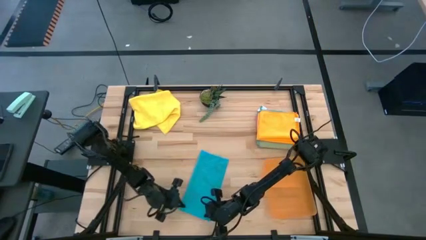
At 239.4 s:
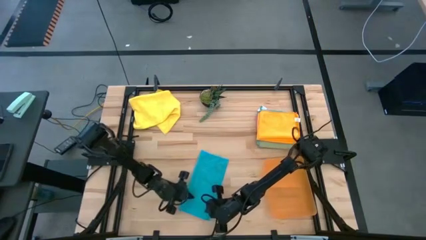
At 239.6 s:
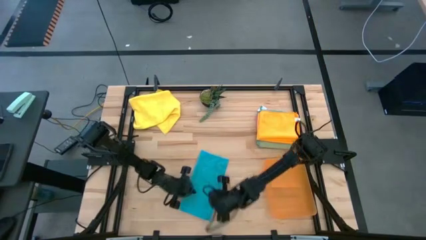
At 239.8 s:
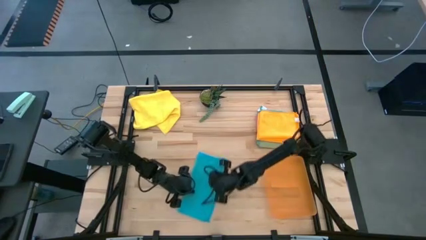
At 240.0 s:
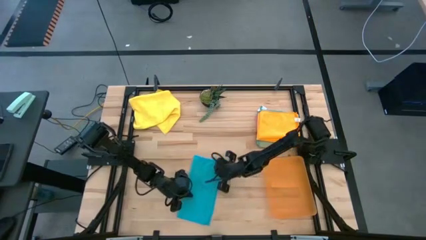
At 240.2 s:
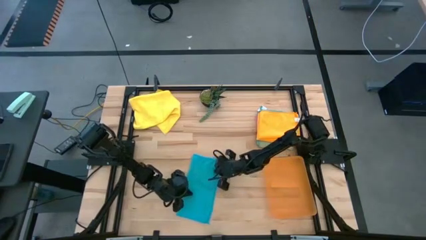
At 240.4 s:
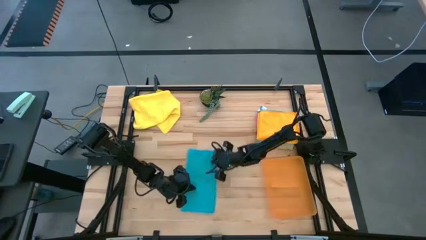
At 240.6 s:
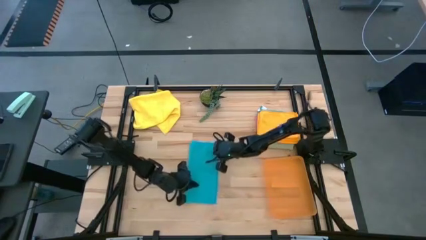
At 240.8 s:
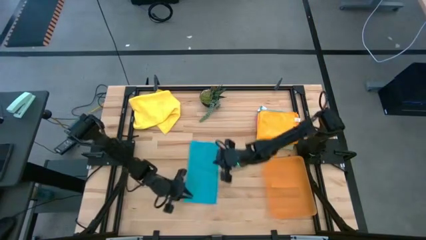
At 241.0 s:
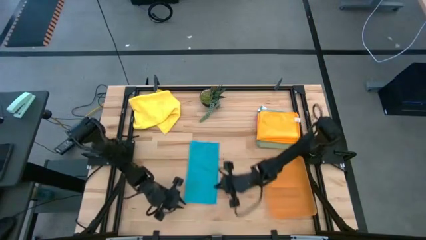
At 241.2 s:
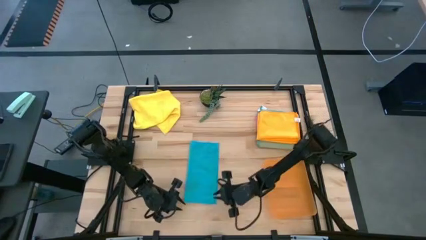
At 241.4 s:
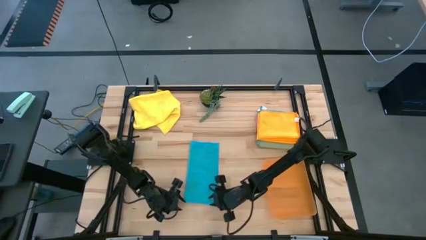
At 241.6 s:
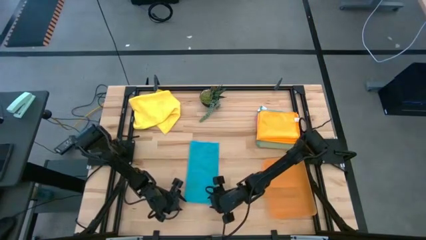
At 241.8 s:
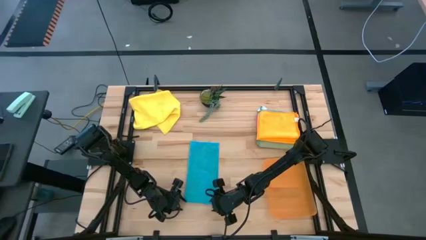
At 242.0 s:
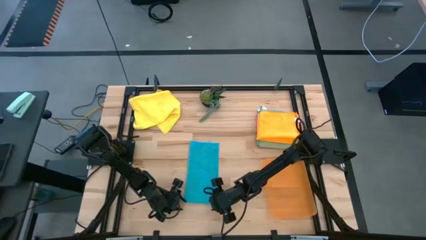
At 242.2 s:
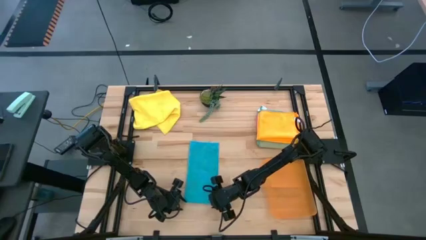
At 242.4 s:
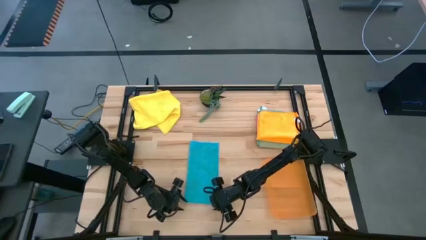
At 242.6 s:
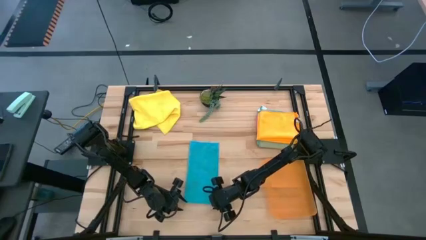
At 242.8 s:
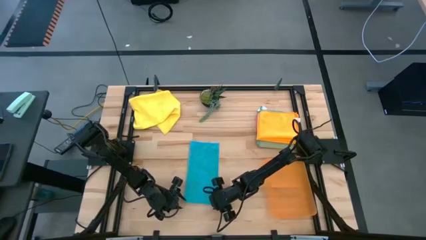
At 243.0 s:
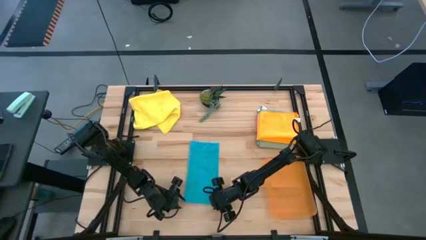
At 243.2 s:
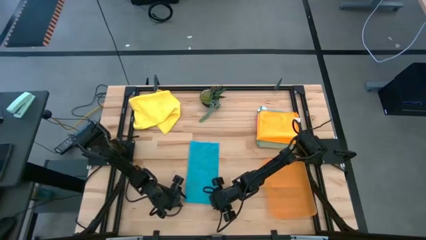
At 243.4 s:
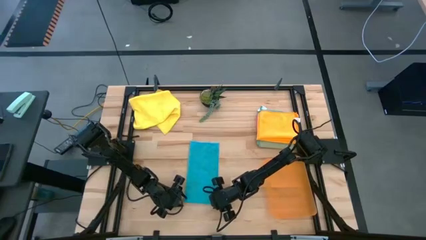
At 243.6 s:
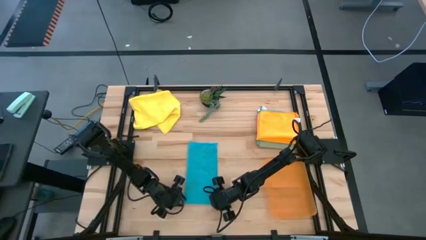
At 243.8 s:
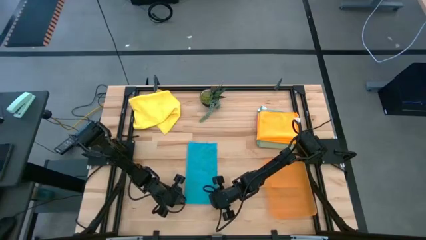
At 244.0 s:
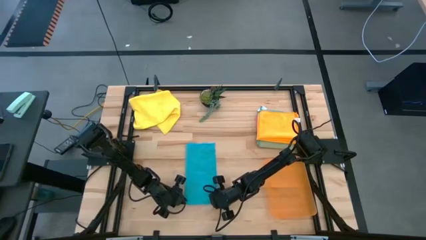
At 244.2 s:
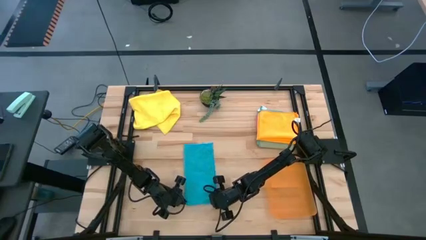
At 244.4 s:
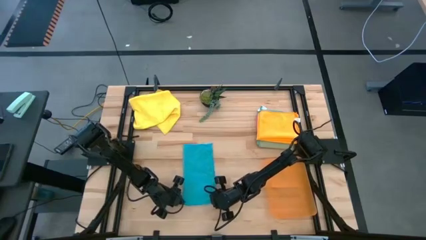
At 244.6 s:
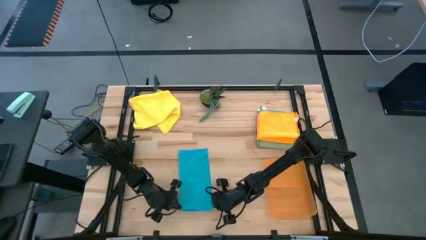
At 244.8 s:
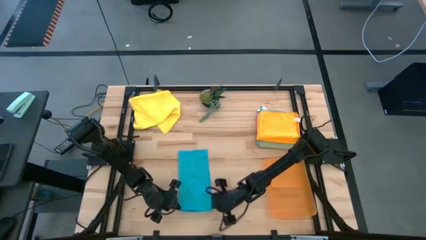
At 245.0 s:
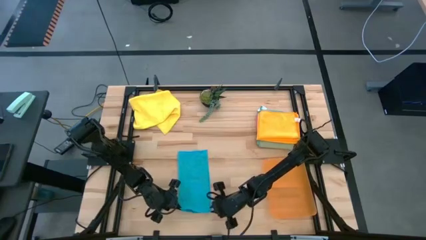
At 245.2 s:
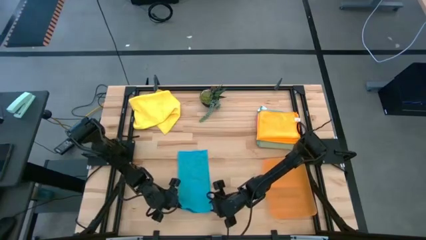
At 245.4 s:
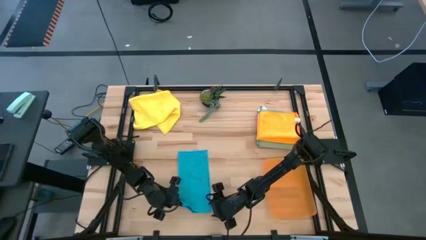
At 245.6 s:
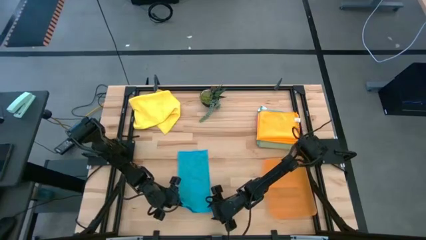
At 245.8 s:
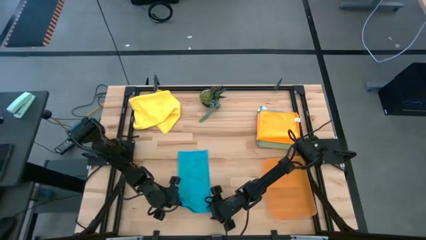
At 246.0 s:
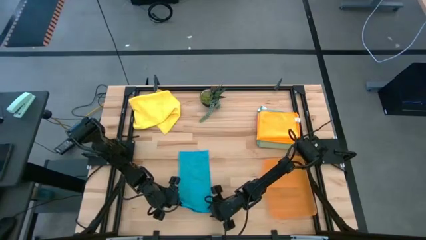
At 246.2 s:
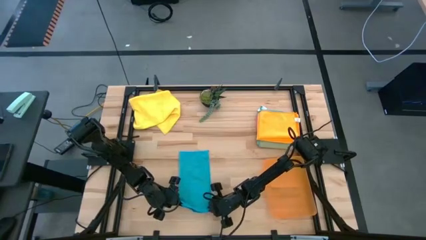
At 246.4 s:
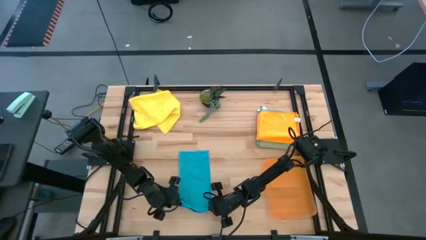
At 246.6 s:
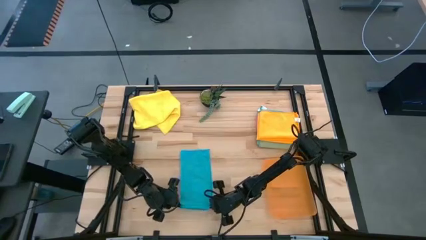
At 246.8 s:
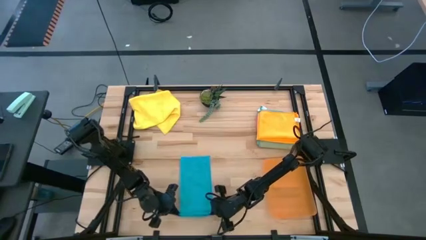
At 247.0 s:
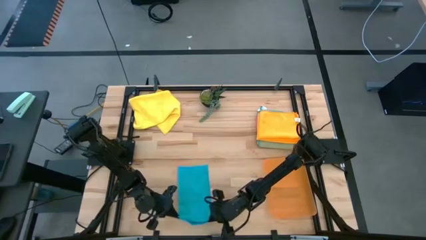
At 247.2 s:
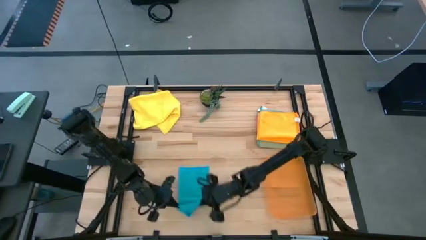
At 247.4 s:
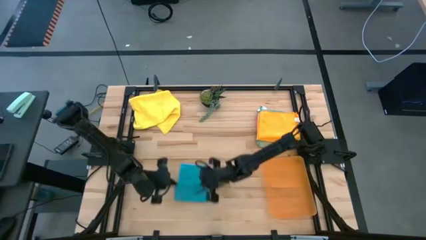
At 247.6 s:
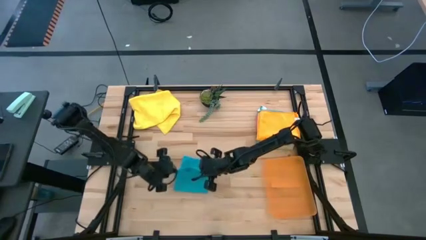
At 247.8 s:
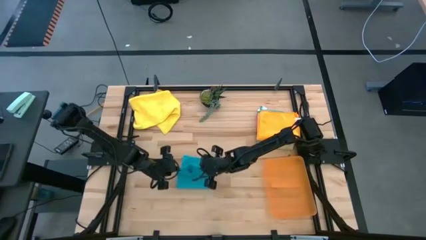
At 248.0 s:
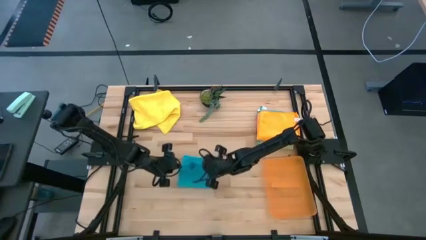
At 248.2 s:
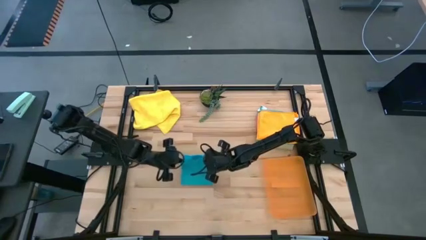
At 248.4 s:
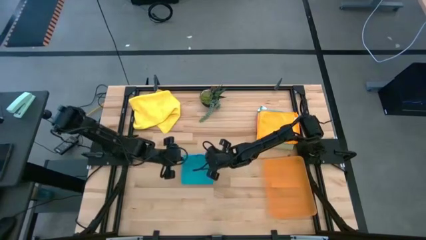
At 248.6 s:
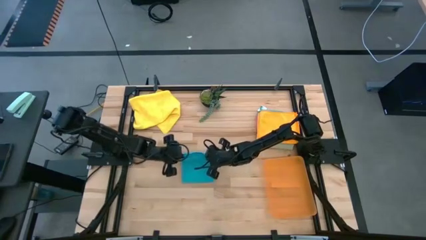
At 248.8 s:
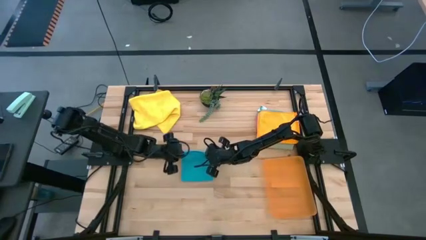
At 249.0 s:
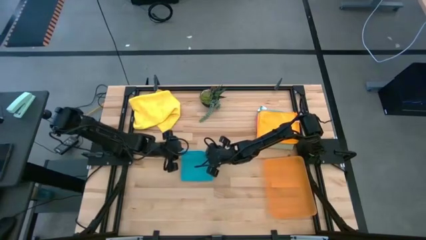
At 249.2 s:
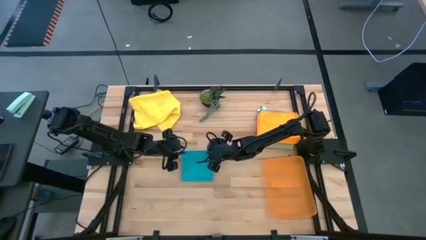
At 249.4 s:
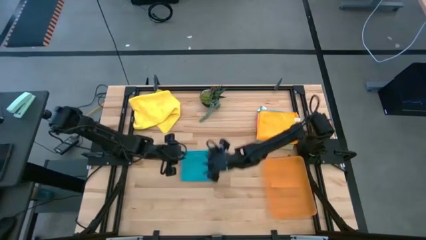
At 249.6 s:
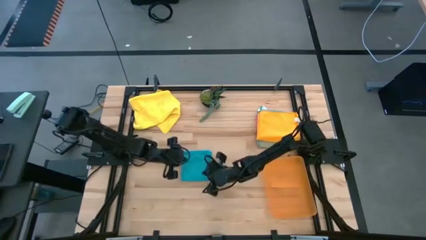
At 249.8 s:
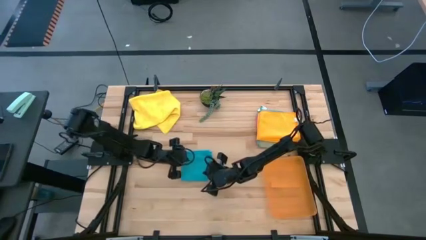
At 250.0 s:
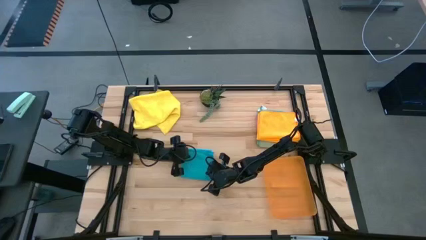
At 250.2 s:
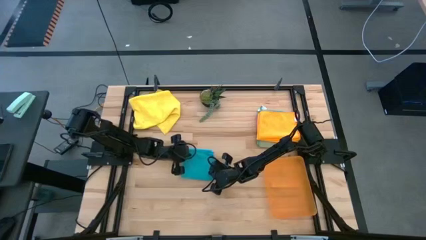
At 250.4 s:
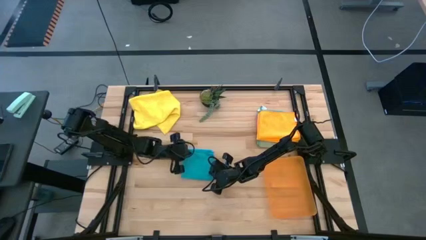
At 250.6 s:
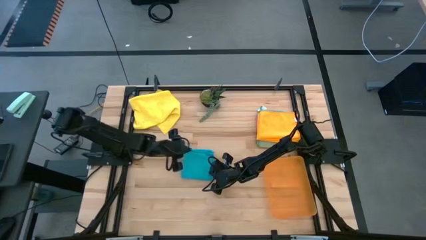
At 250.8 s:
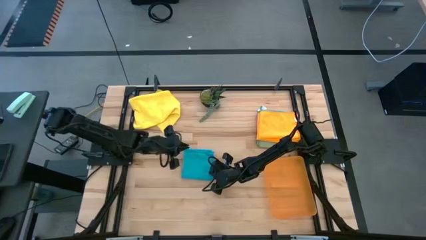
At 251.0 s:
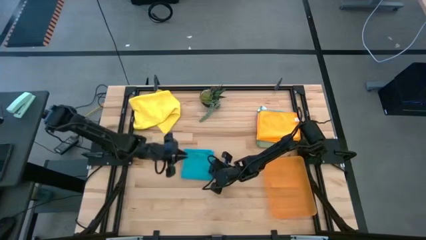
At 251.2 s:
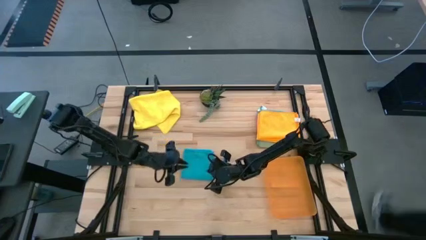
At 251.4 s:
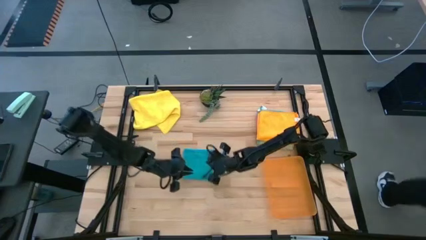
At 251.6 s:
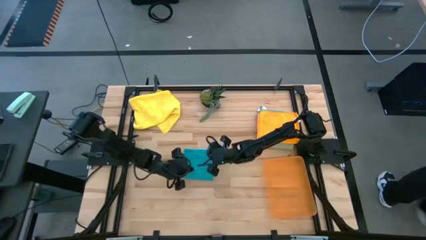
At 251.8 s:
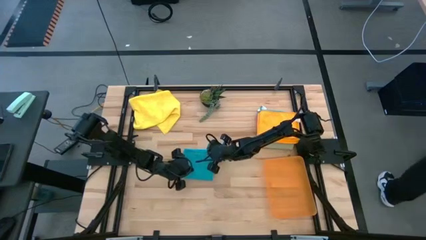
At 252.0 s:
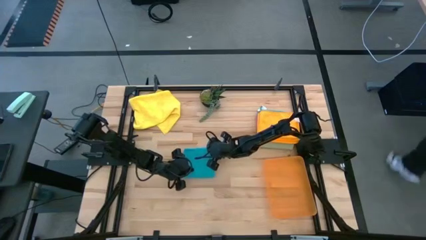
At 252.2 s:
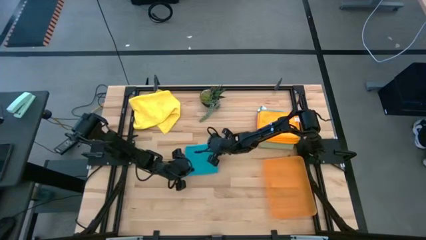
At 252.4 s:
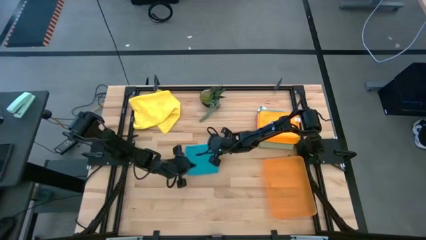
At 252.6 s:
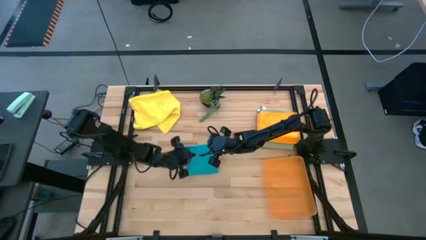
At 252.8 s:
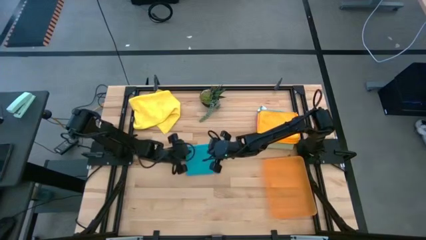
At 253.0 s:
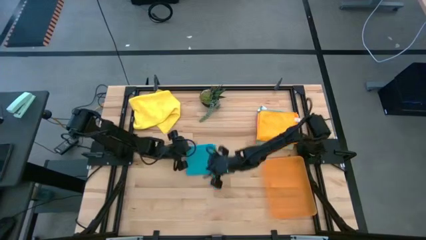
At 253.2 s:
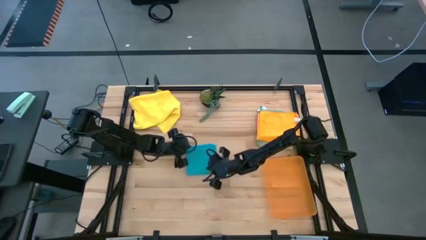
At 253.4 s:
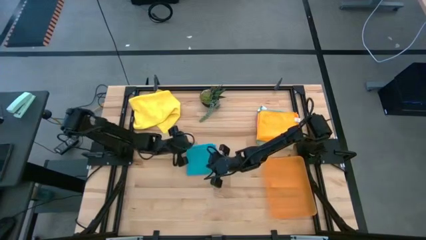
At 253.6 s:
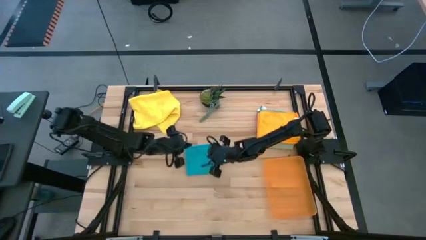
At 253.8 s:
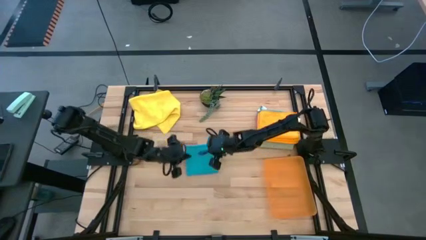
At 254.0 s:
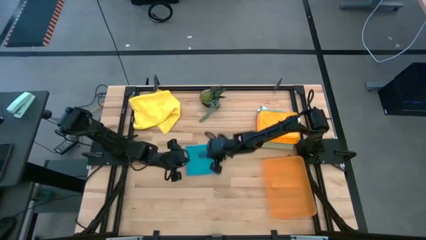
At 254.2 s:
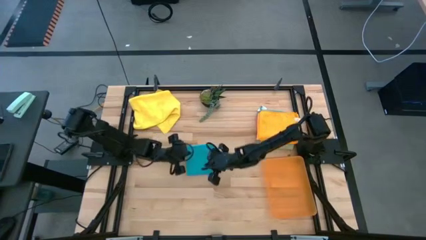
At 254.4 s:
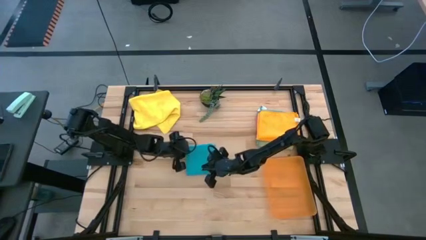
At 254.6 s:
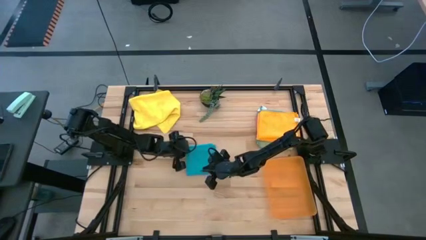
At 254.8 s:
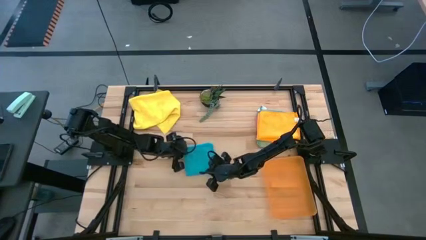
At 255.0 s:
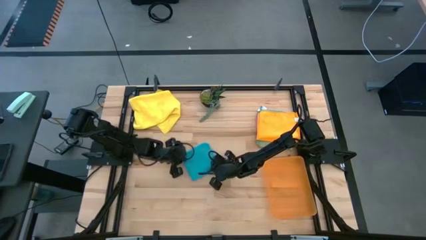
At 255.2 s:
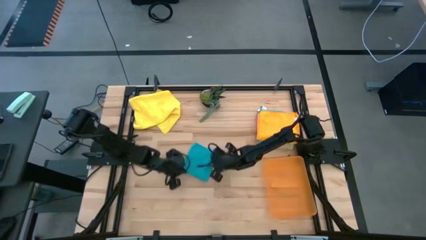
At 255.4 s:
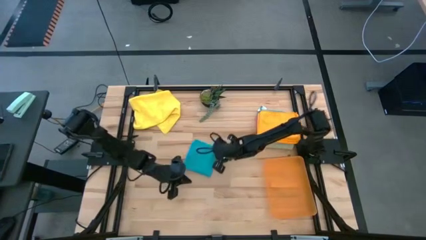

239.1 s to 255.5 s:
Task: Fold microfiber towels
Fold the blue microfiber towel
